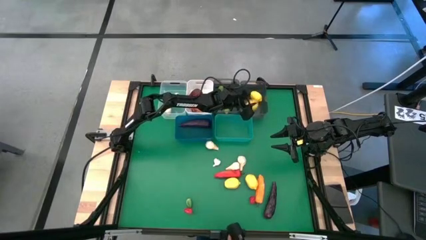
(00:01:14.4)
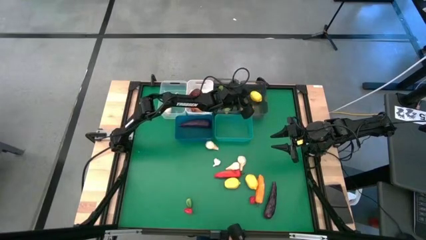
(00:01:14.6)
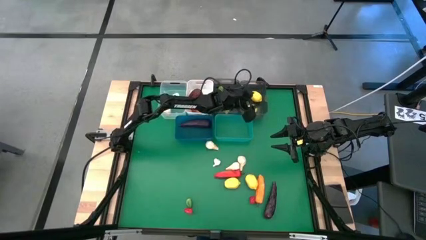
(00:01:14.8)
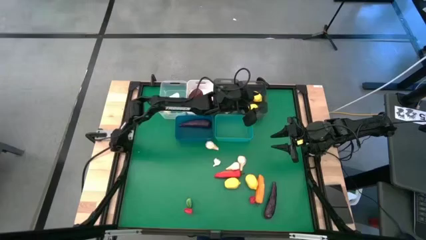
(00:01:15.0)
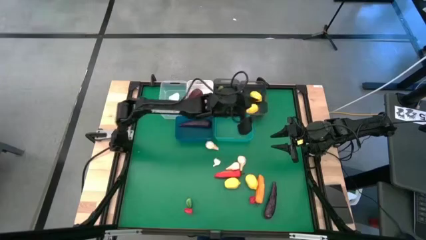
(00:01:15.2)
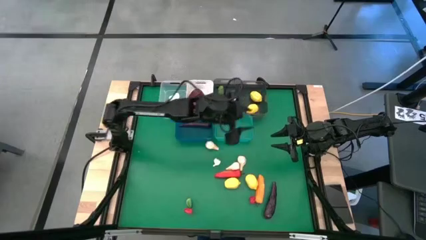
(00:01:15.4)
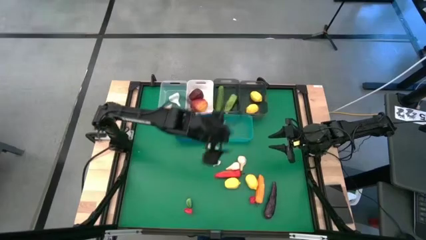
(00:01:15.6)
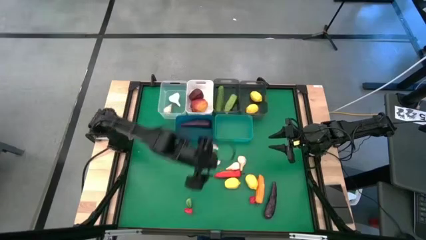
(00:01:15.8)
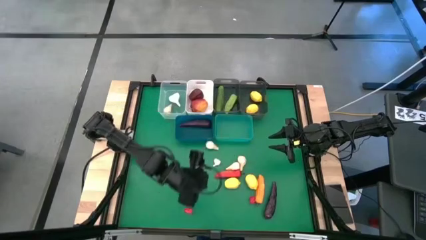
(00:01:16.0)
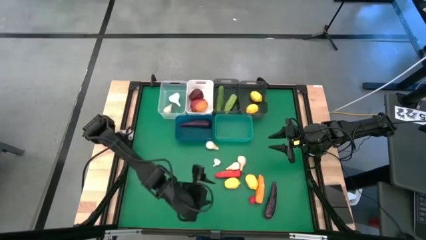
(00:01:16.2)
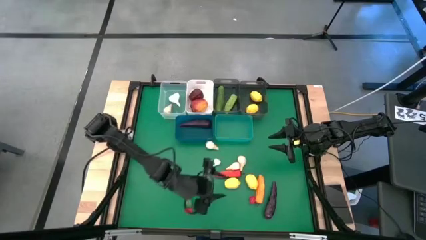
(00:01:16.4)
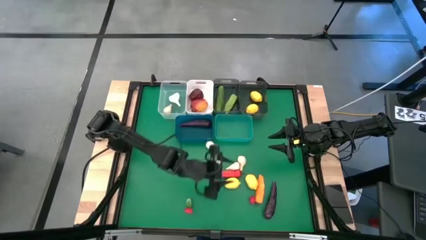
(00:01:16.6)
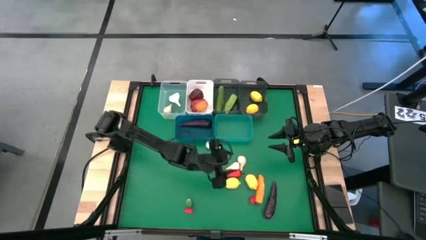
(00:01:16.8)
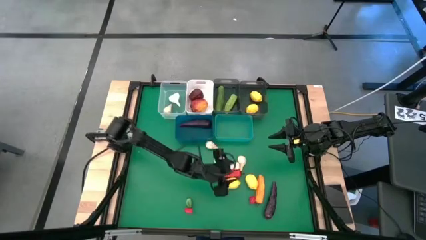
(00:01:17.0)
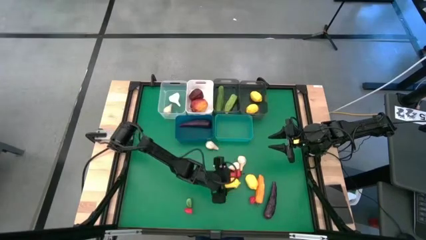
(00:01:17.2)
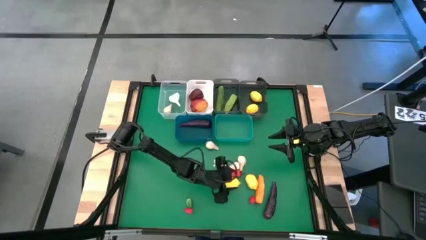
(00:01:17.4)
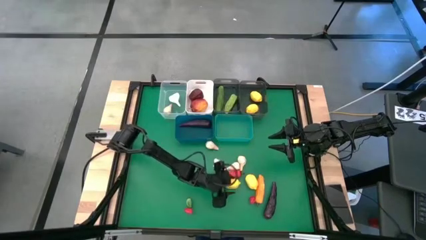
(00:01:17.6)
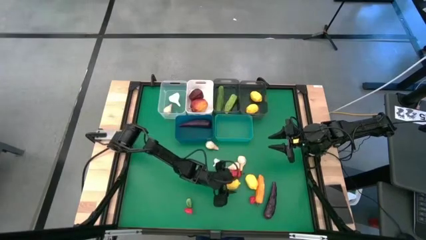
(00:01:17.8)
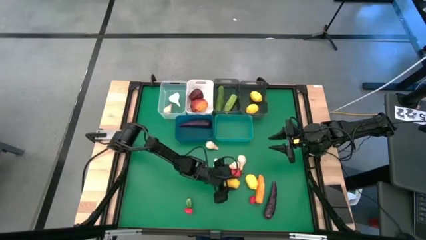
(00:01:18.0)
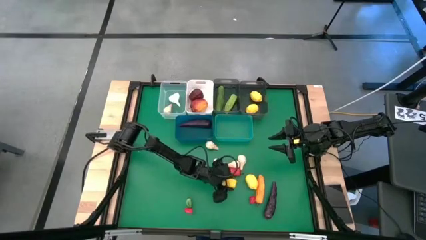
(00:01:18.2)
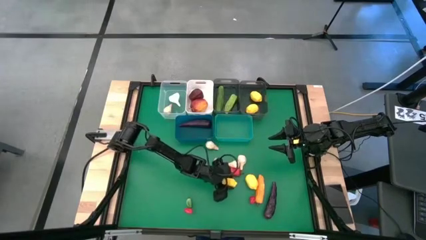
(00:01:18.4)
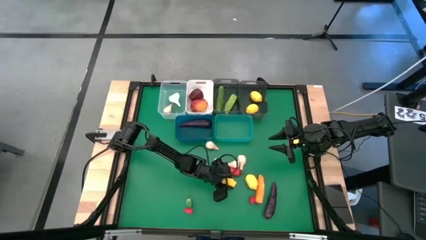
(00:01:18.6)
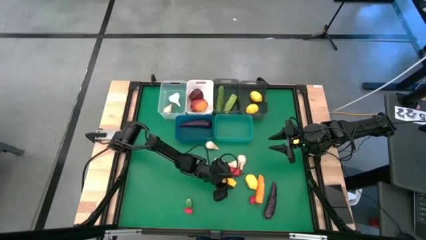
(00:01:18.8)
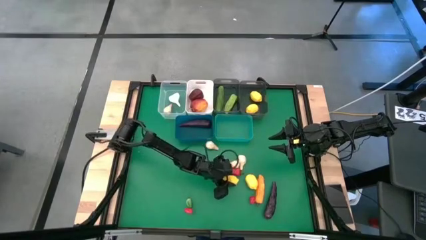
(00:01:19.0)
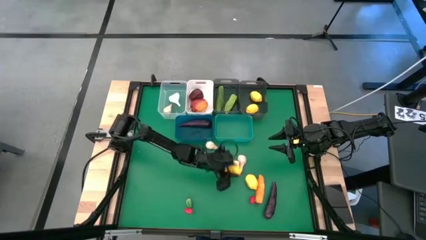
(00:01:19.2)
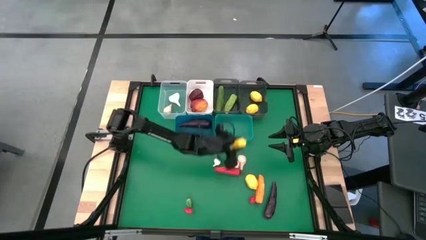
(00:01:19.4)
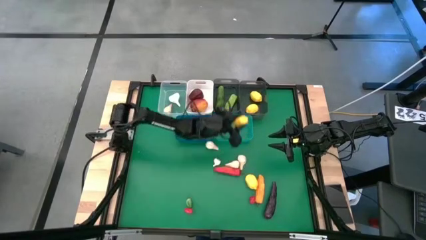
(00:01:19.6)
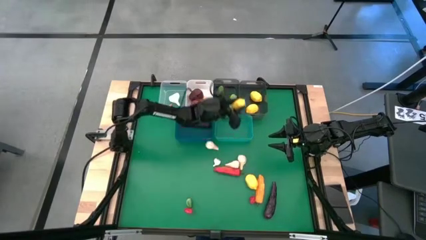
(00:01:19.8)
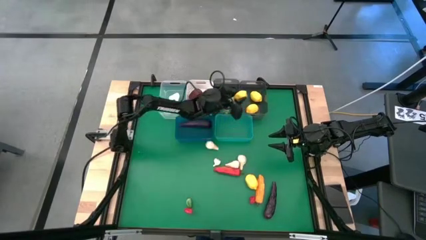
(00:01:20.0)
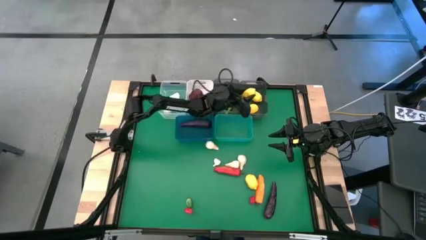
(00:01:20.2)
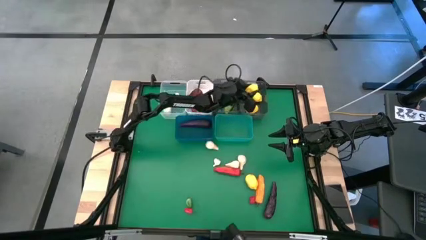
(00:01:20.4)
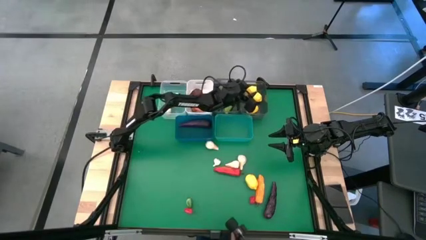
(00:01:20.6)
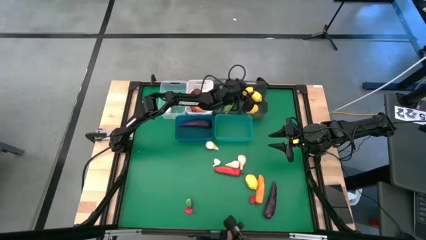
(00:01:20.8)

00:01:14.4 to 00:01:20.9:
Task: Sort produce into baskets
Put the lemon into the right black bin

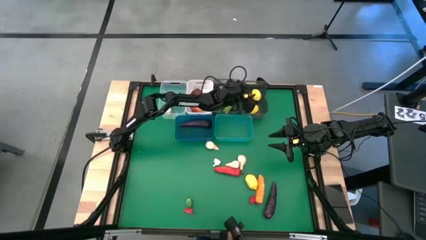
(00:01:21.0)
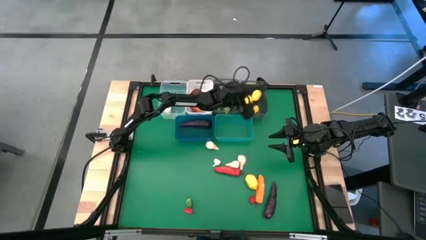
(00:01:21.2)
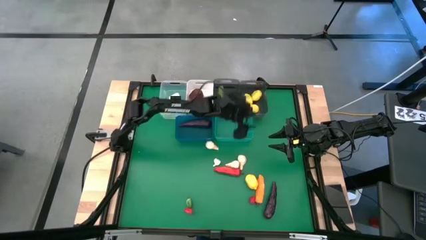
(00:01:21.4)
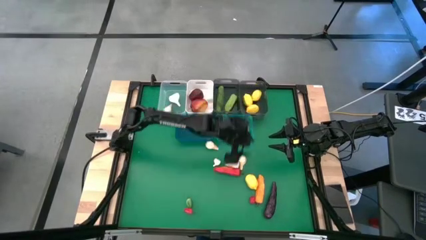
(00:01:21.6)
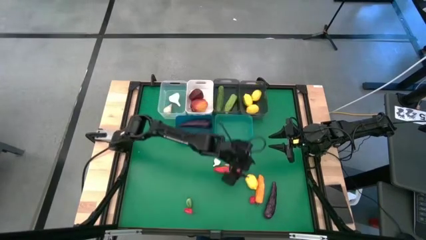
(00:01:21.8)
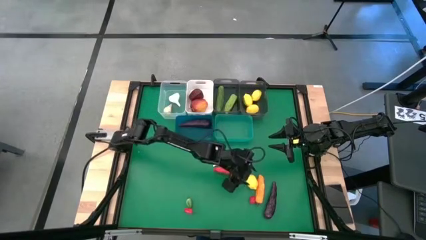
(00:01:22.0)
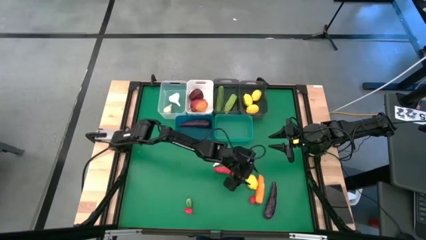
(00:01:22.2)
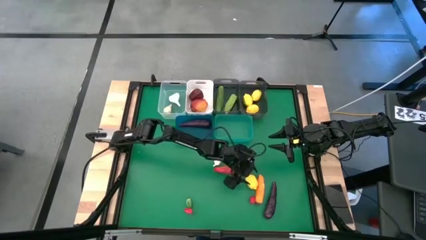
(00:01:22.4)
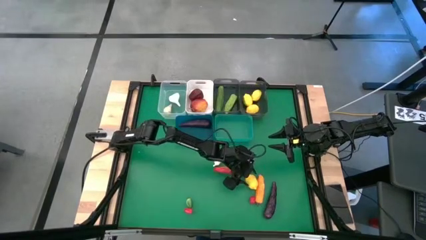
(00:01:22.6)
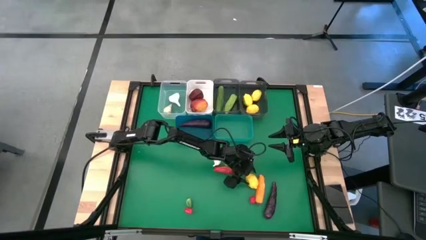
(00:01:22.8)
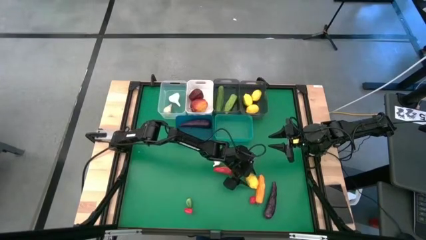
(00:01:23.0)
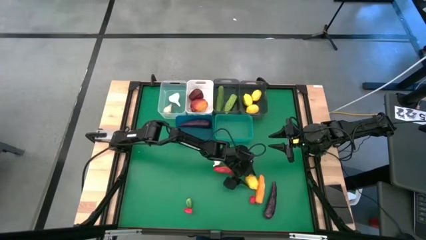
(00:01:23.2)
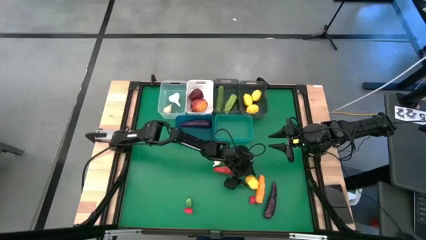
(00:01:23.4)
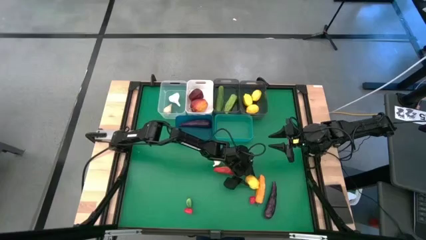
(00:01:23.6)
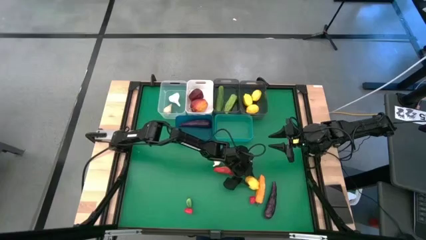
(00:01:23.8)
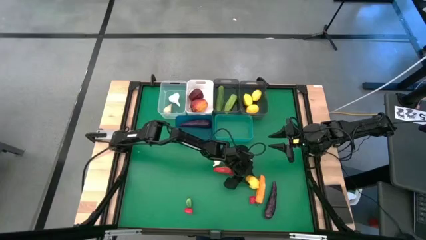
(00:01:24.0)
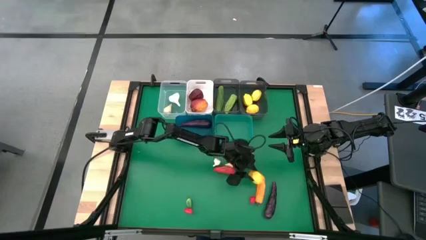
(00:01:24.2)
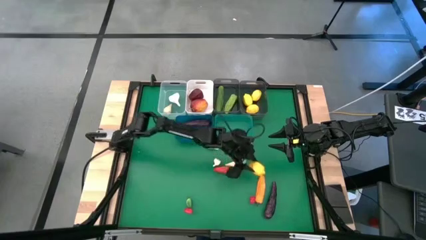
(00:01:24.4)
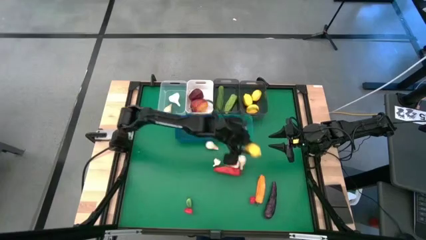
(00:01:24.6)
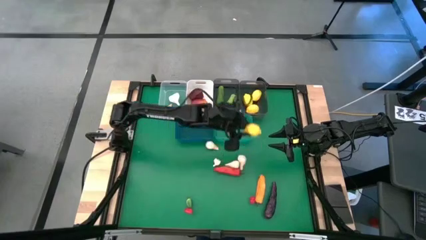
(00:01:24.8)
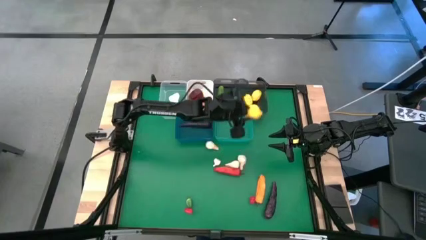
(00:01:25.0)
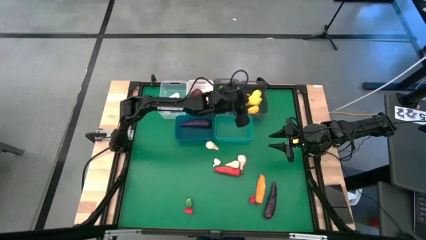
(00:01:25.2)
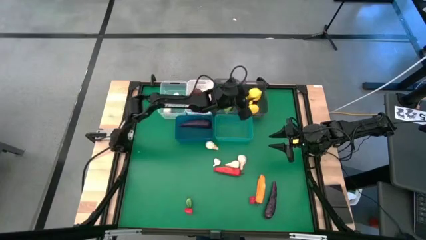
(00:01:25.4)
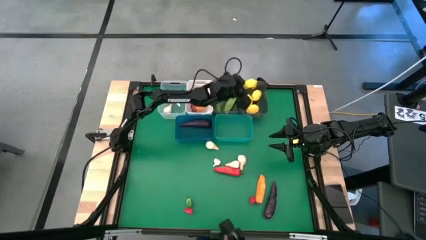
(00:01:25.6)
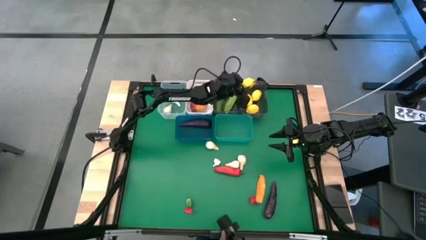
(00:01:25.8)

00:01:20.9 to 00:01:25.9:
Put the lemon into the right black bin

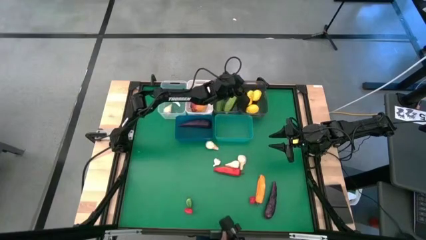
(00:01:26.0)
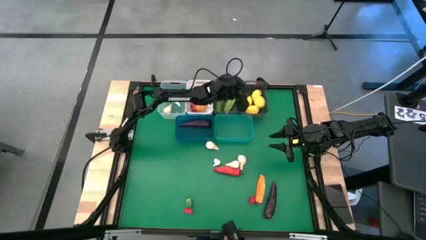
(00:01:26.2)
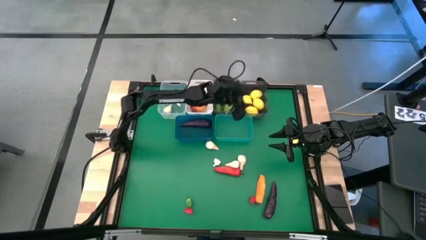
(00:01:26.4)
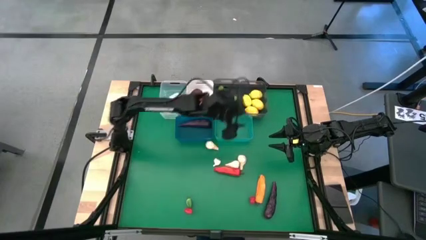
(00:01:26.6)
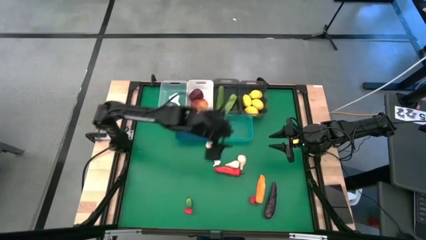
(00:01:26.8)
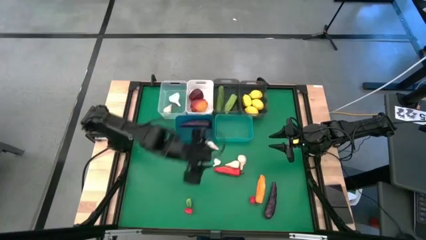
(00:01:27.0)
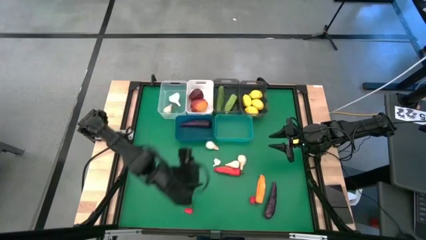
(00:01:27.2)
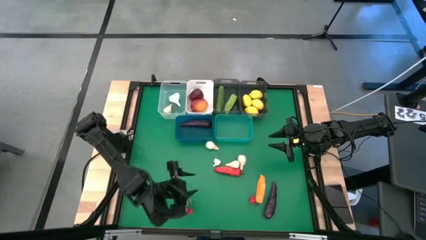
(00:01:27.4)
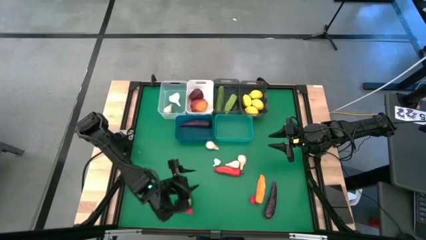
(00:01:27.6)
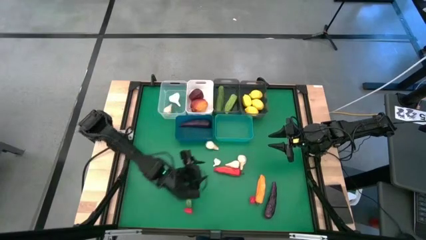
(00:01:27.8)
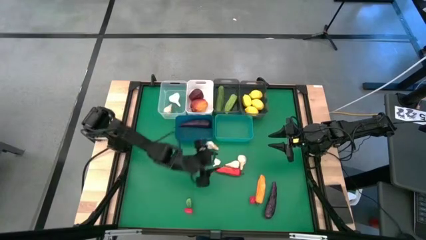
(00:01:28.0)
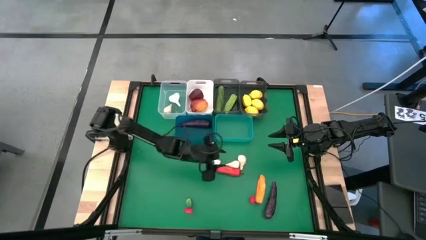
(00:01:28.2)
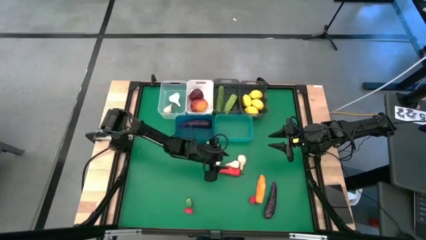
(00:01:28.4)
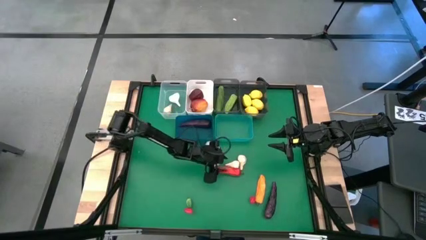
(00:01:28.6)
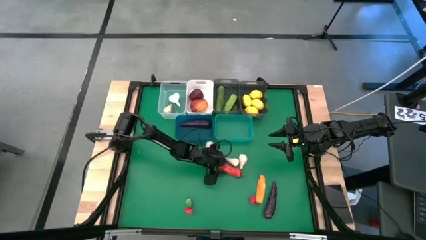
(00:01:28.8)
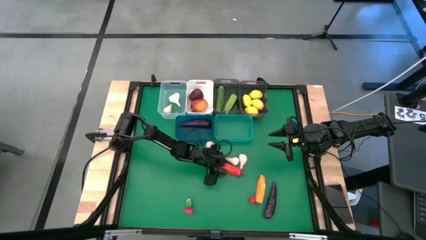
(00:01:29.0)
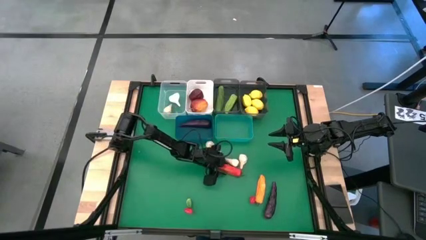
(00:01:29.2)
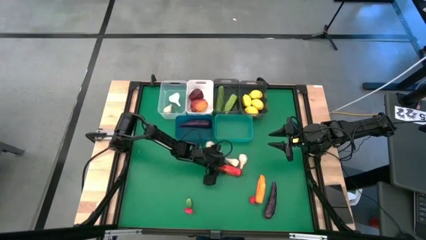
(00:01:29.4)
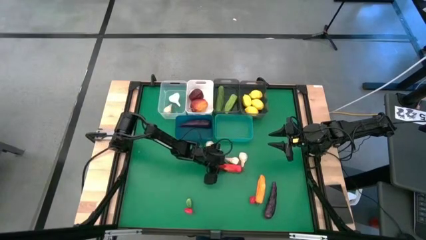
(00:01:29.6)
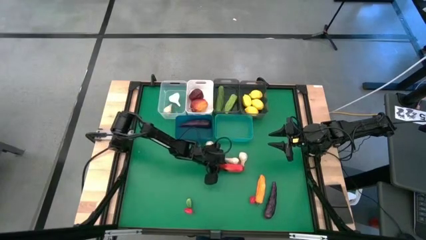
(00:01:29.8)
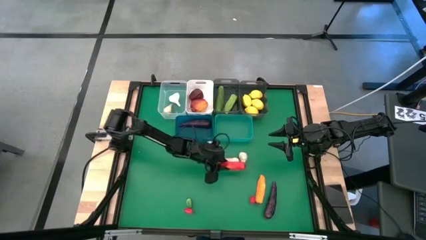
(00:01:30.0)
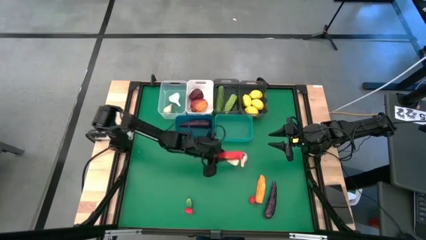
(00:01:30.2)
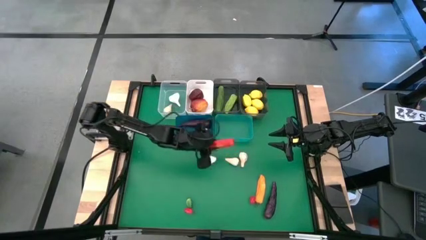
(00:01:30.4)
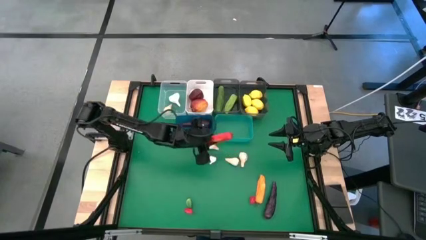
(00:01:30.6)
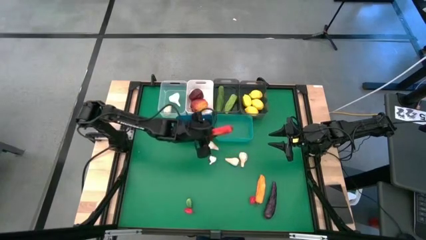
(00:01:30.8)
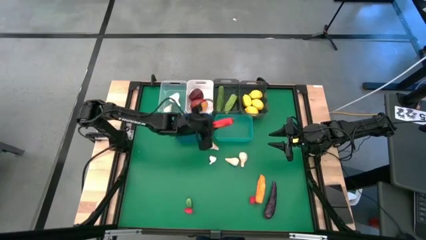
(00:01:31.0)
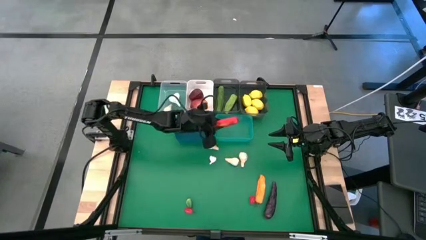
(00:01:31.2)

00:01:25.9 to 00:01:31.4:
Put the red chili pepper into the light blue bin
